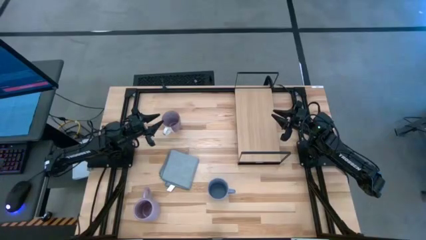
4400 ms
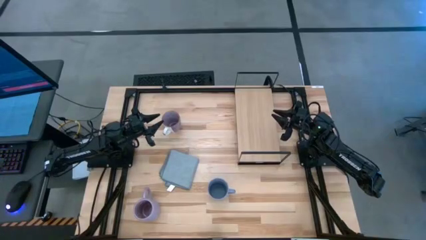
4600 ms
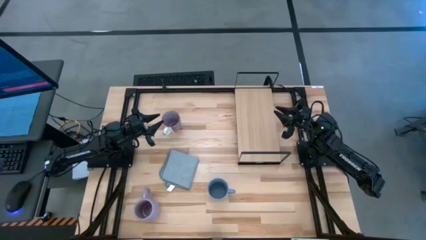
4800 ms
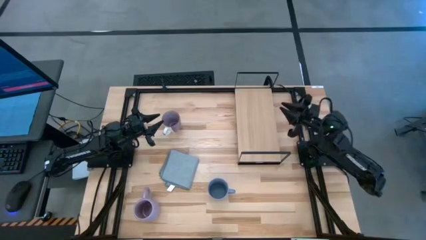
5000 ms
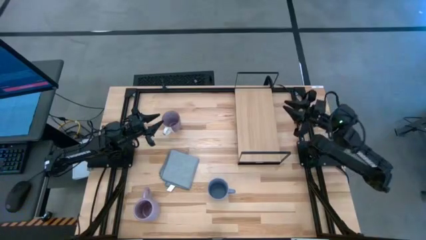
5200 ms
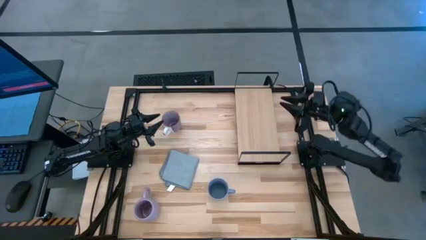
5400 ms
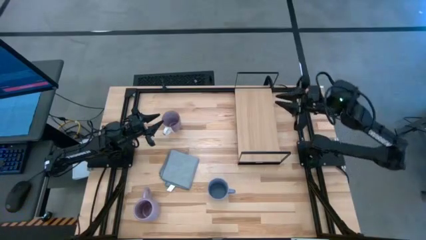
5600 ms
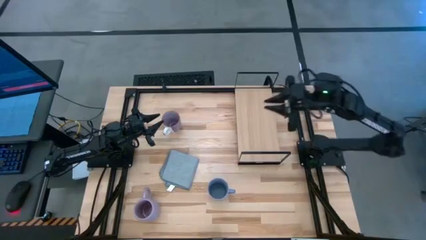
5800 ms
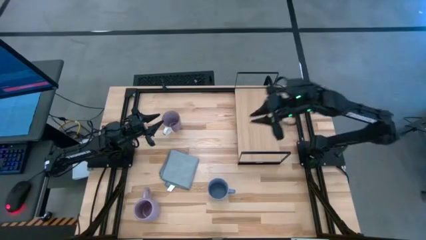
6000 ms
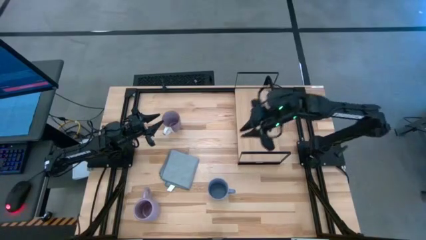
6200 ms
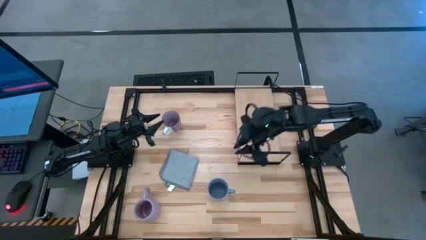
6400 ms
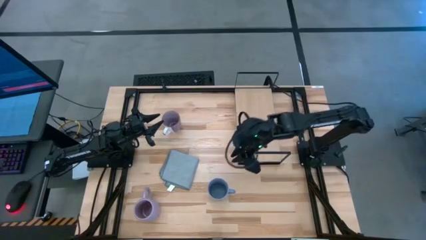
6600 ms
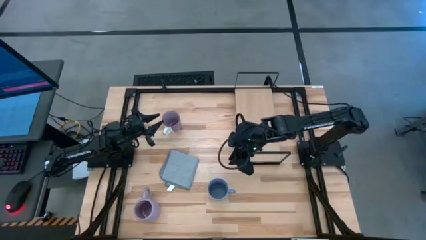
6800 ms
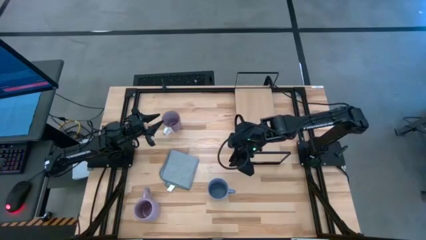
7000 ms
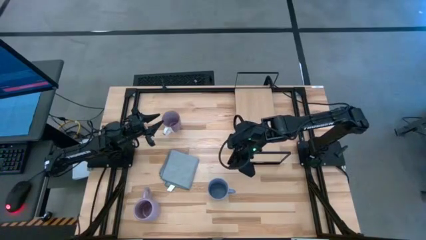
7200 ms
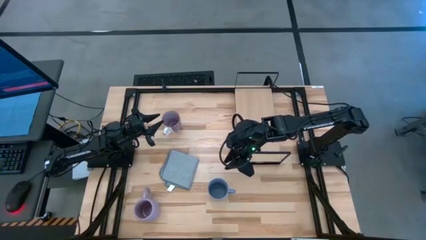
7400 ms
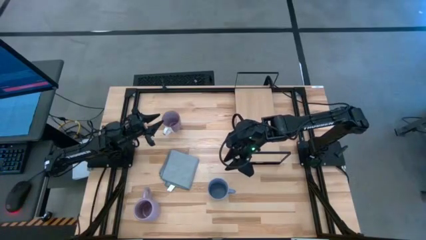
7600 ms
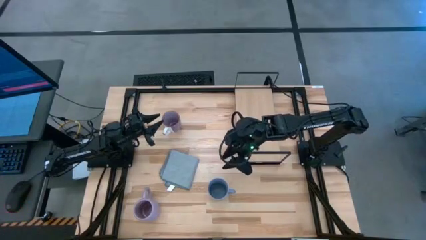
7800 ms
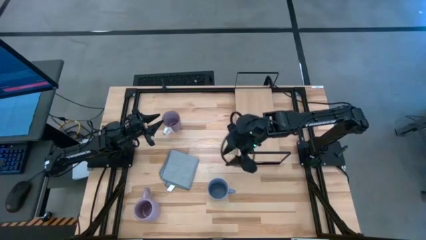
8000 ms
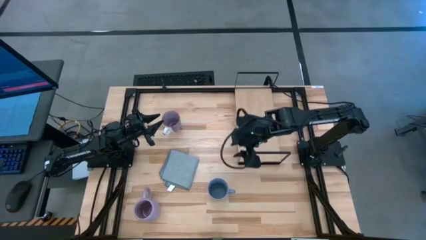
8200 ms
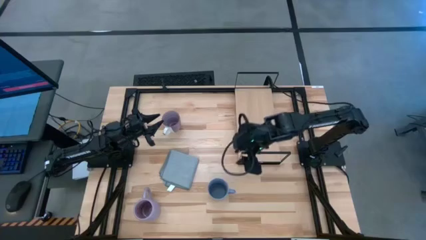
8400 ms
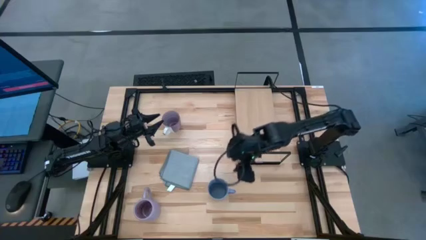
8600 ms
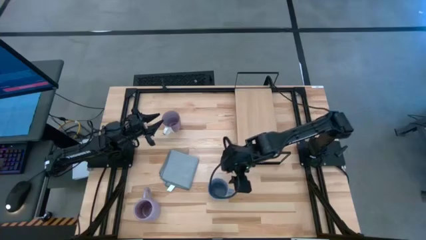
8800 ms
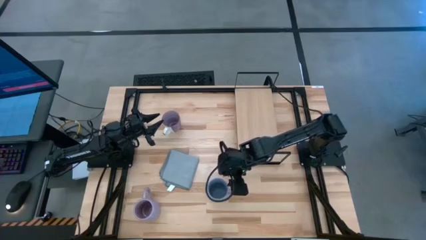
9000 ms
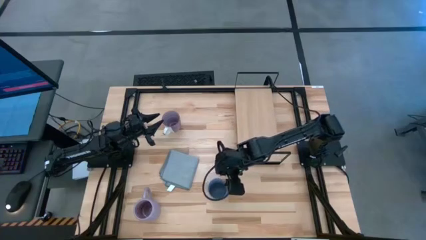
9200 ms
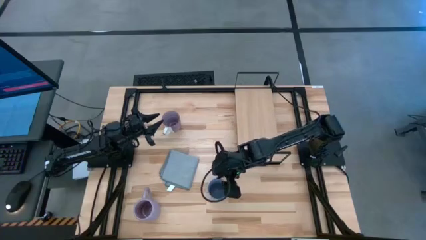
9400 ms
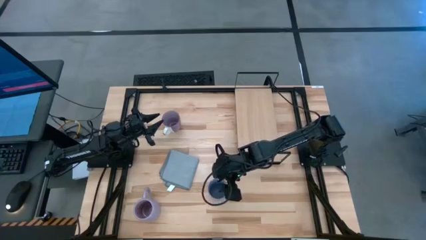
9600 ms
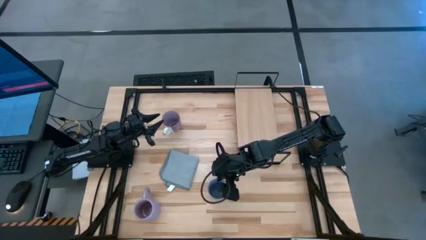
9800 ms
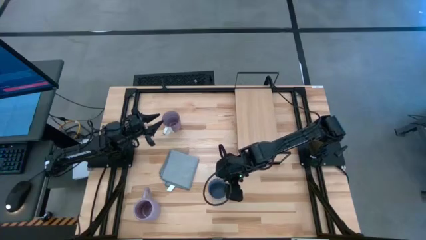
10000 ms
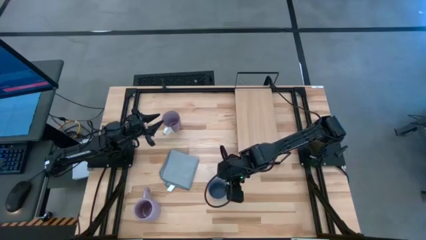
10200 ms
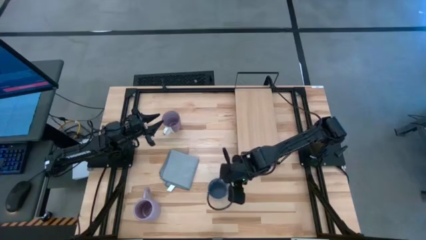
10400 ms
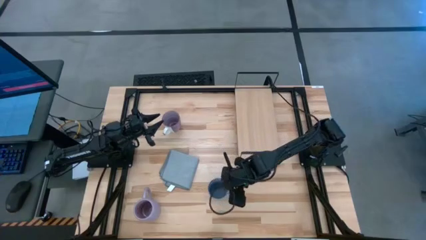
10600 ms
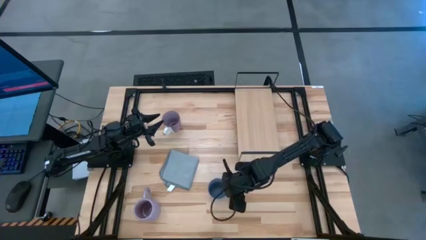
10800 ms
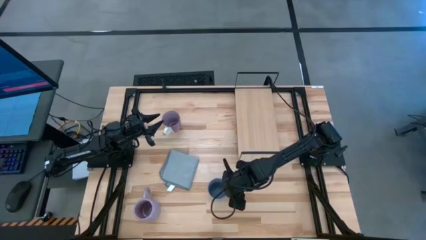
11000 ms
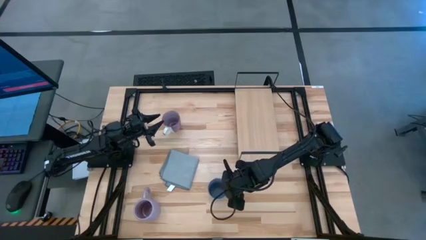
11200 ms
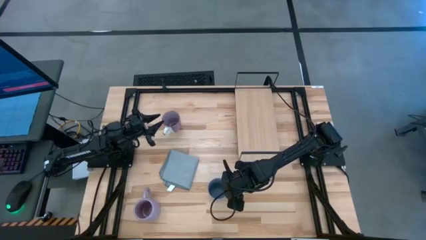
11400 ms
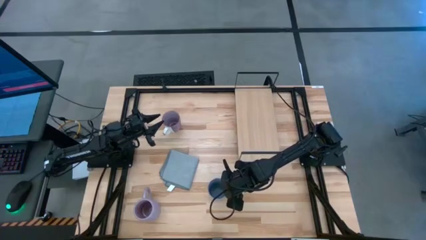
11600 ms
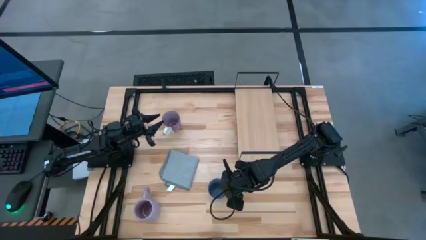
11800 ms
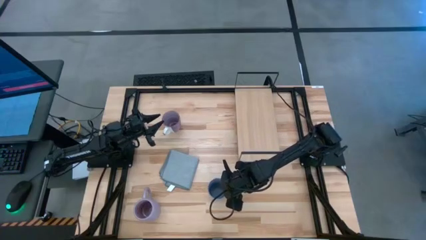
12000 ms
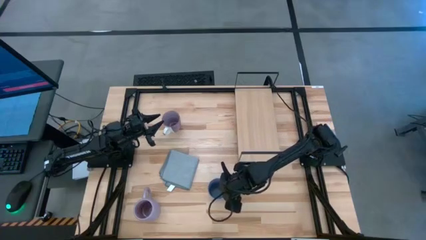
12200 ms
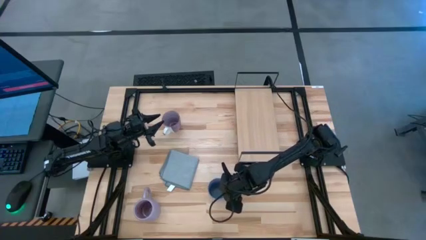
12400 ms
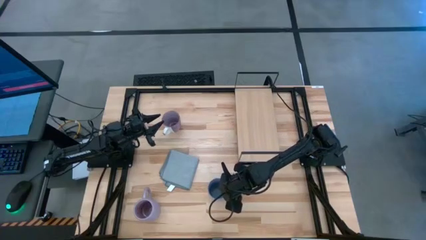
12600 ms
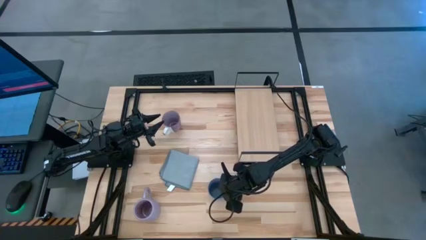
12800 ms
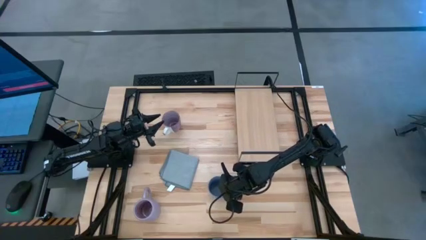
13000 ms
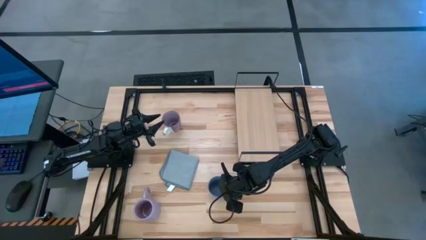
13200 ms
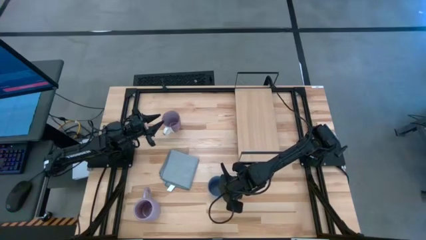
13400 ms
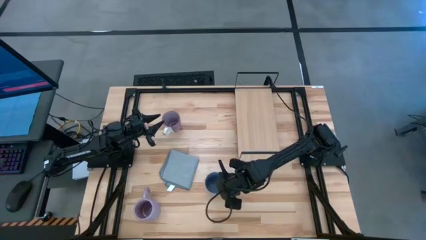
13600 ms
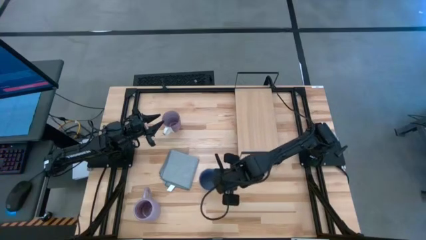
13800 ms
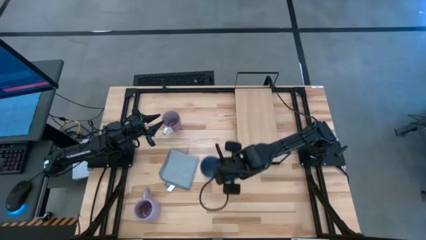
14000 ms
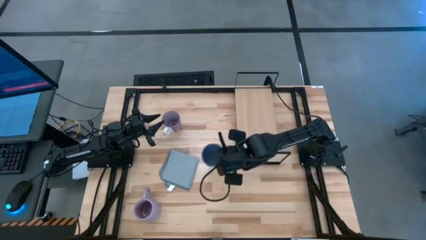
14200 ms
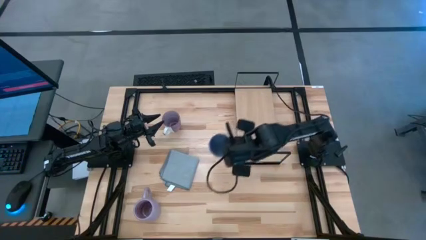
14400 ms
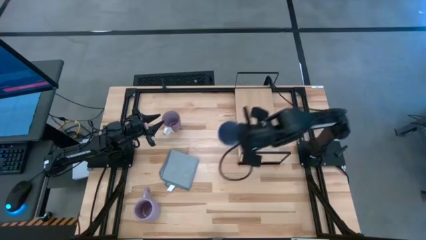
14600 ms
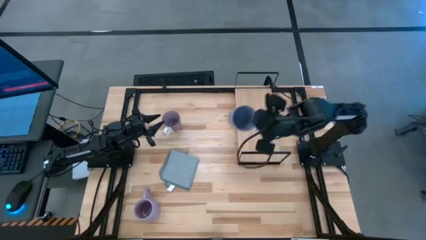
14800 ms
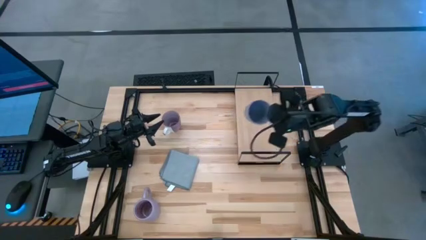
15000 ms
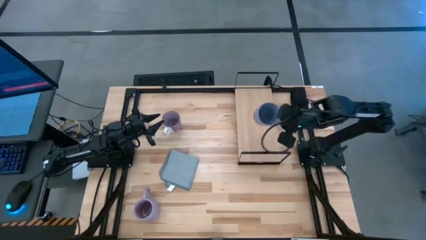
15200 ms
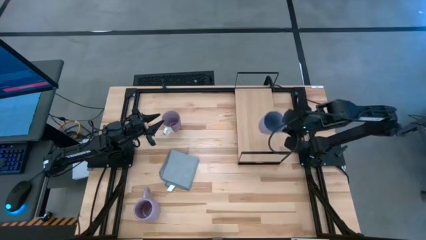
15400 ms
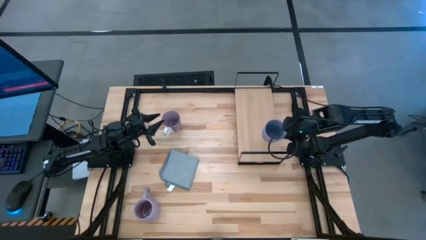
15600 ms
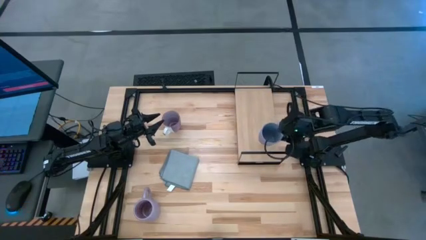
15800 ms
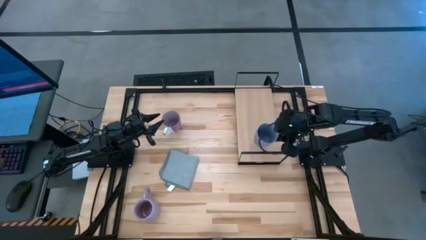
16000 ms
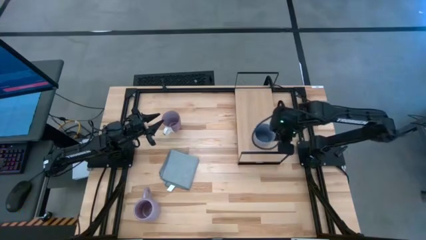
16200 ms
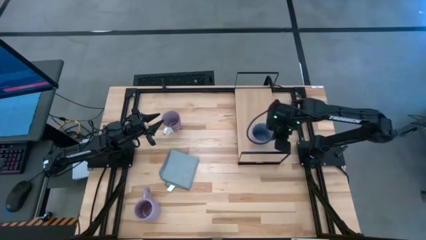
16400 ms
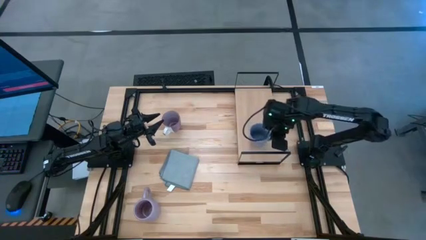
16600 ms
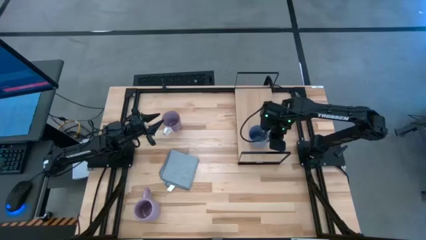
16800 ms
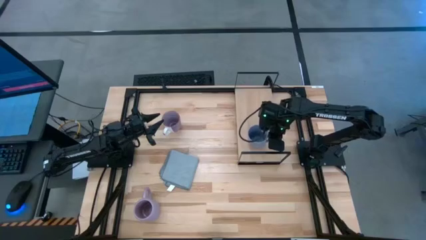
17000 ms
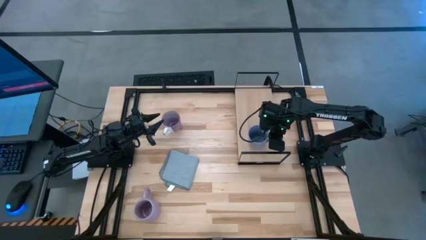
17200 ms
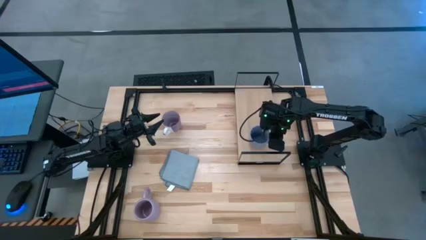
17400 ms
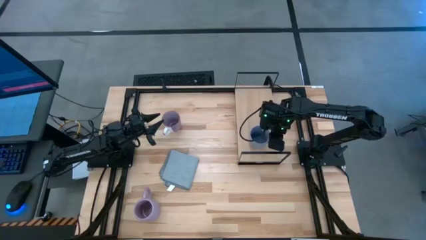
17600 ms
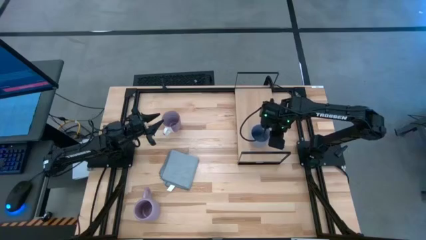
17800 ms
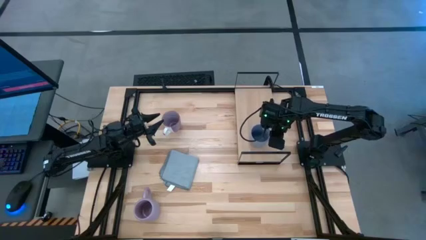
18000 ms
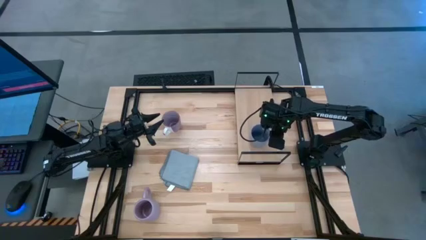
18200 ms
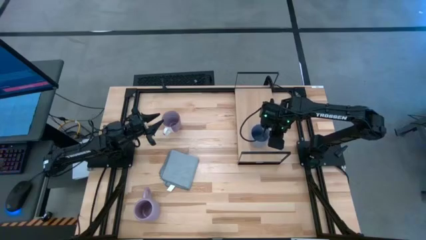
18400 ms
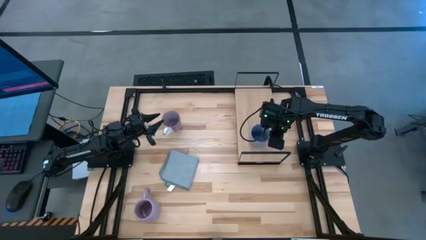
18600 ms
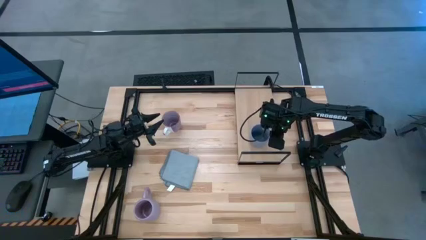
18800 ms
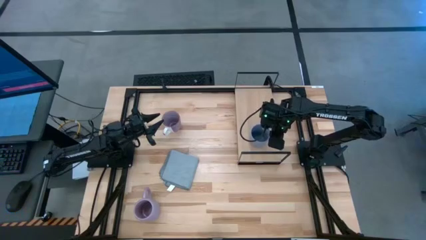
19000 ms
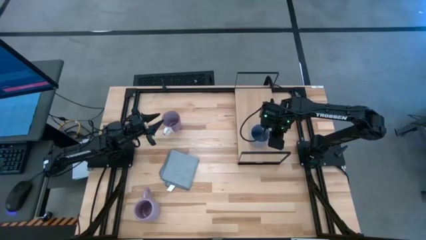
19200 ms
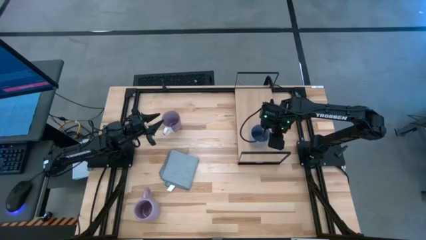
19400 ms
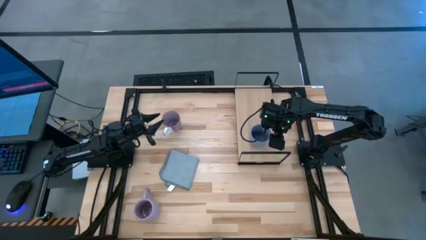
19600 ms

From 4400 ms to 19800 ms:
Task: Stack small to large cups/mugs on shelf
Put the blue mug on the shelf
